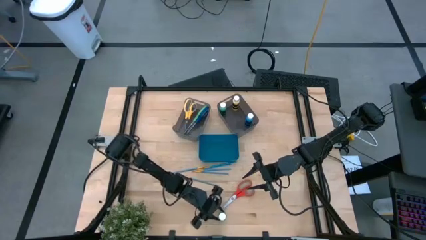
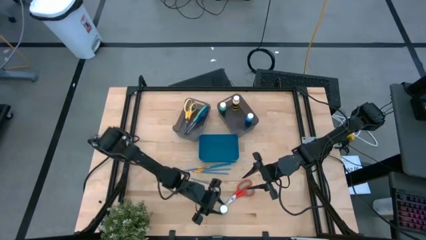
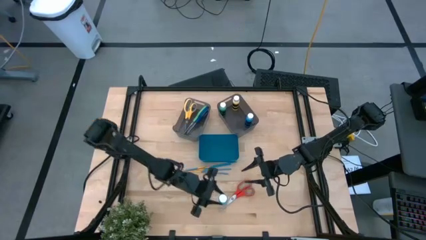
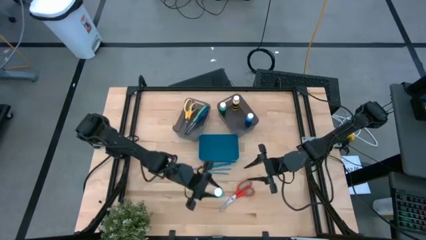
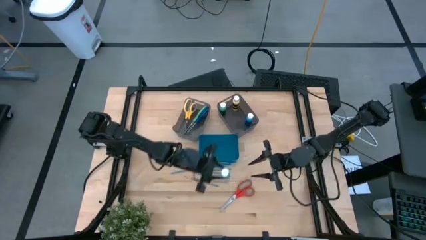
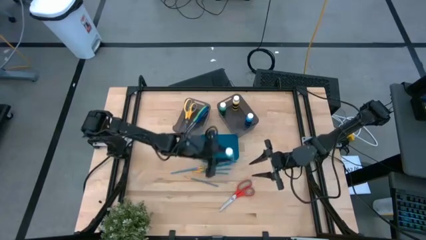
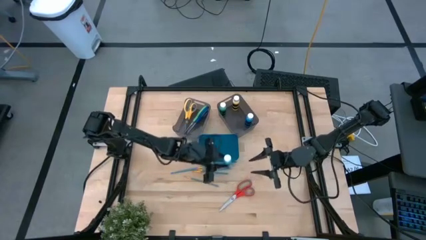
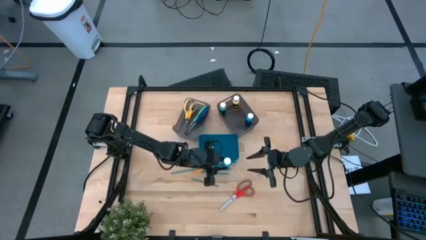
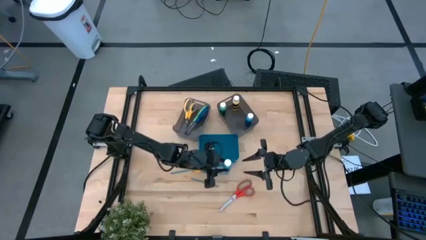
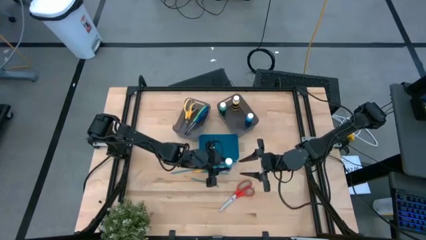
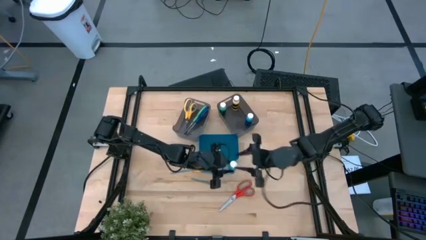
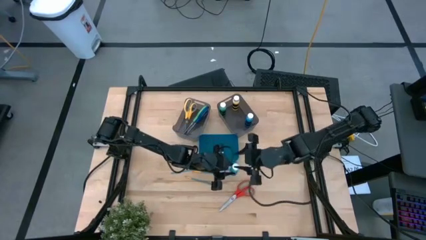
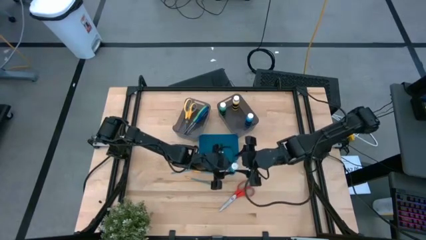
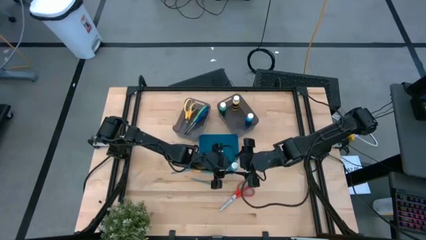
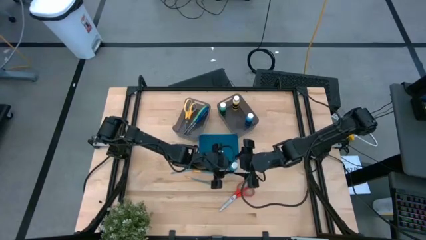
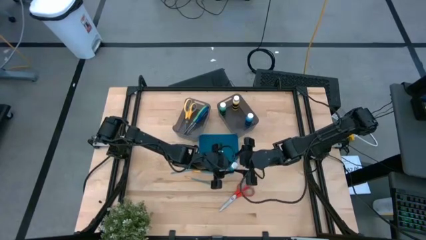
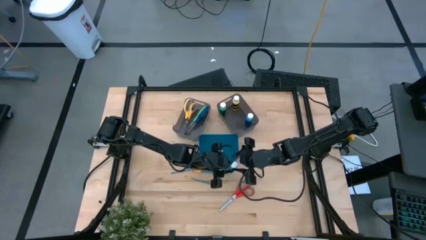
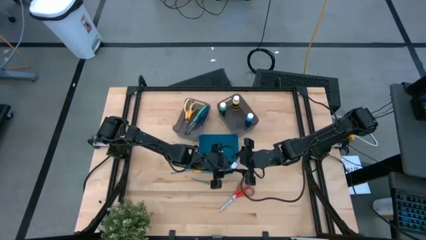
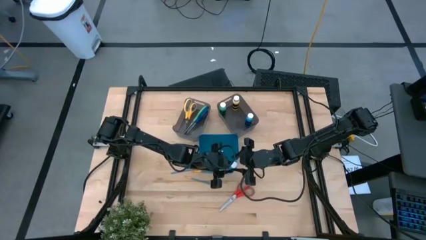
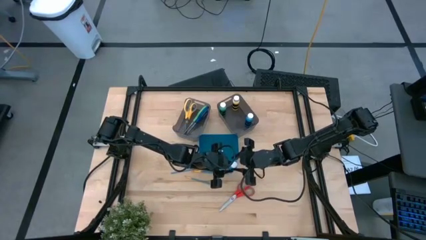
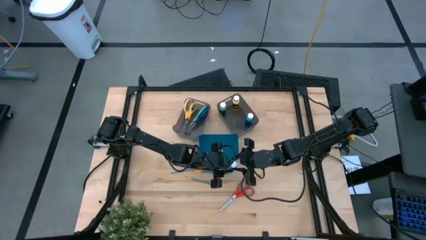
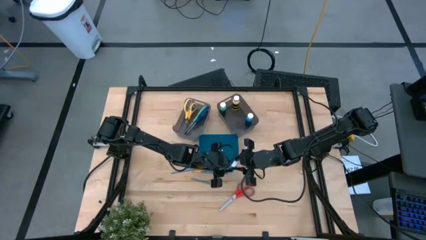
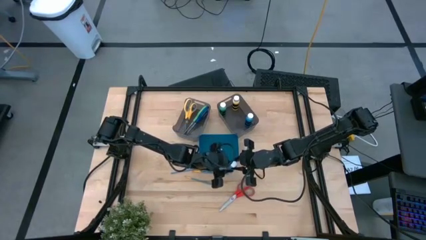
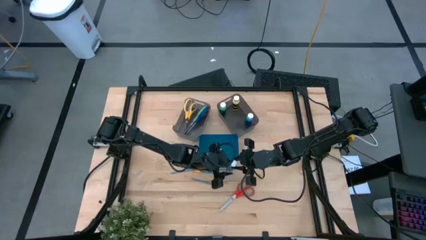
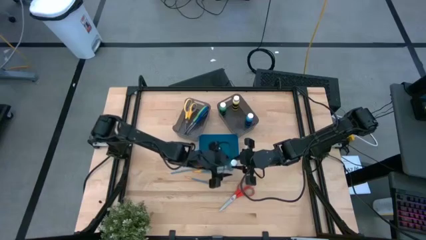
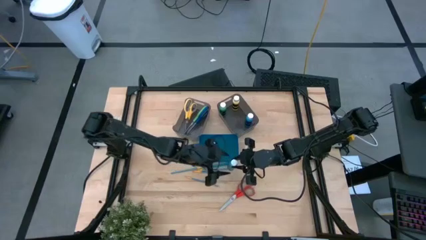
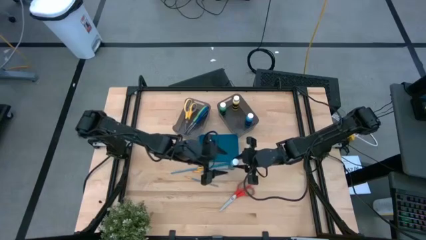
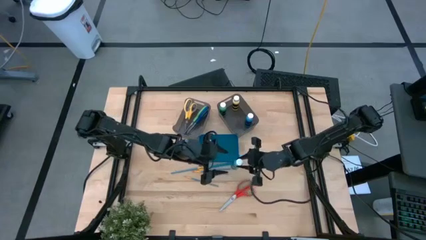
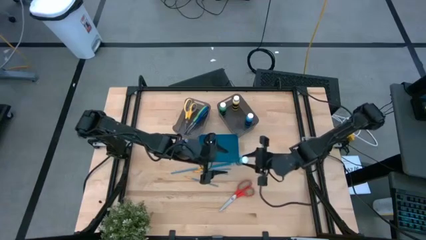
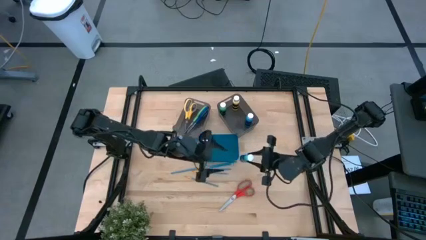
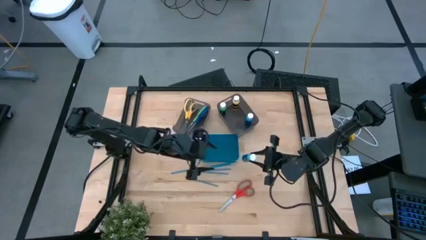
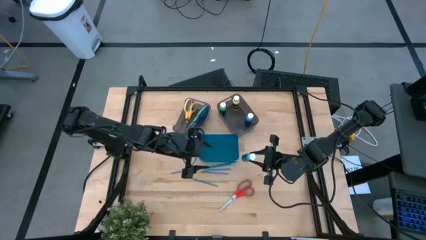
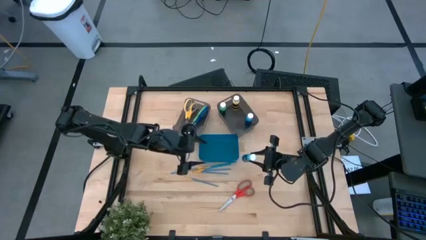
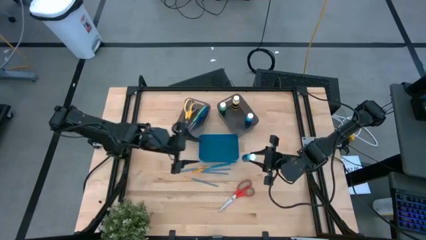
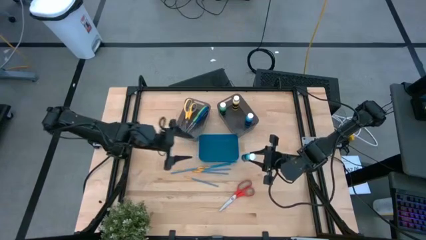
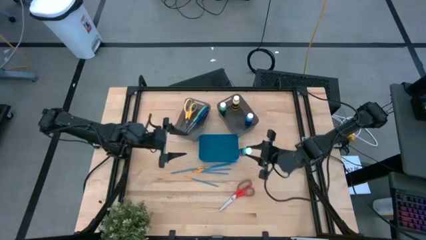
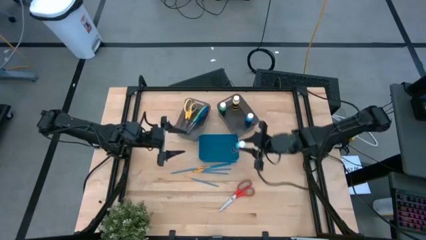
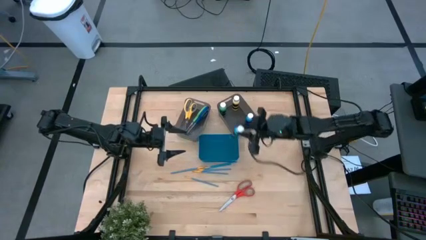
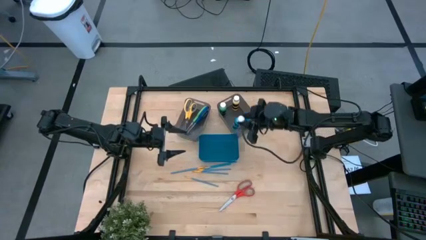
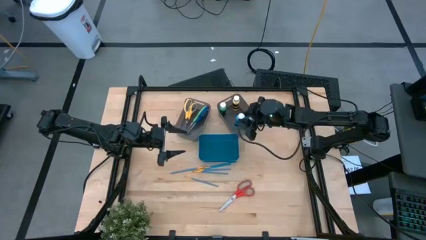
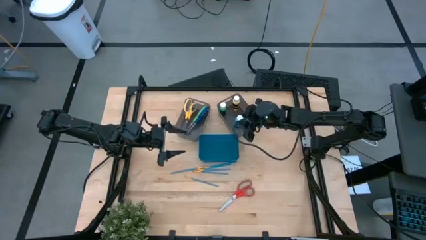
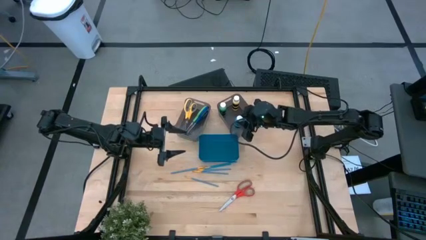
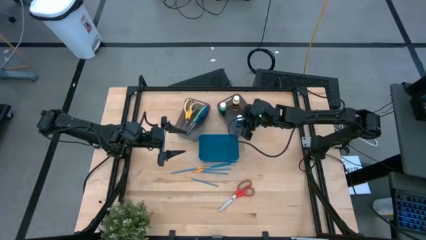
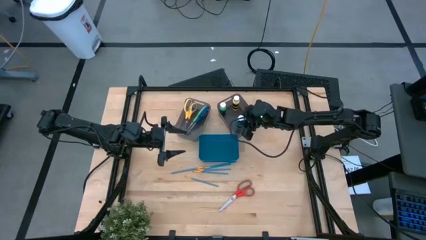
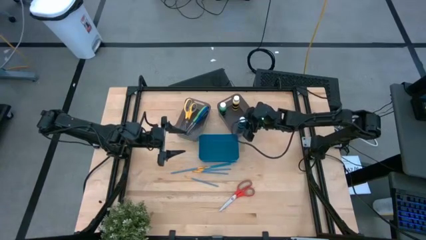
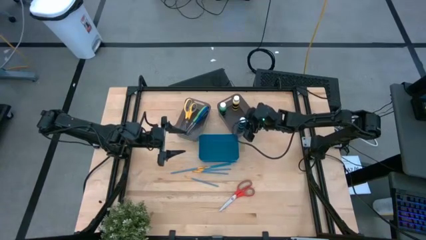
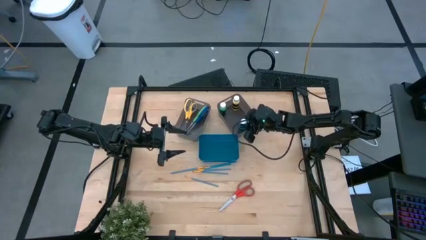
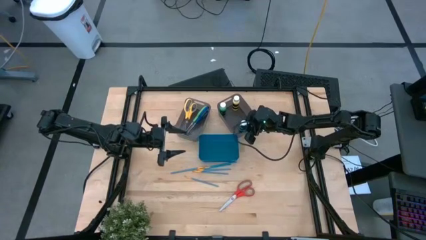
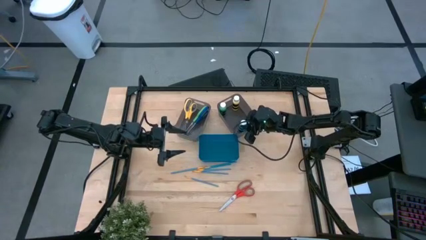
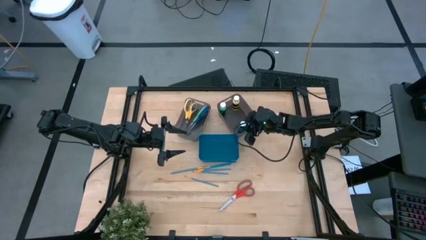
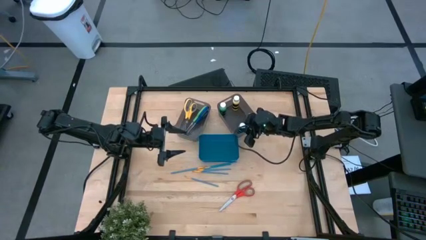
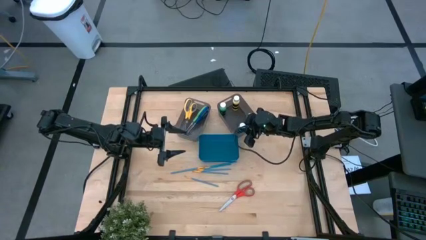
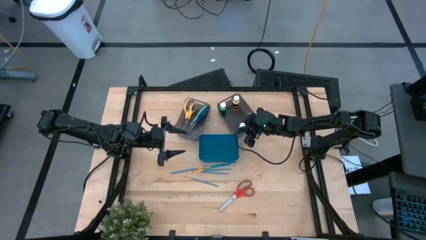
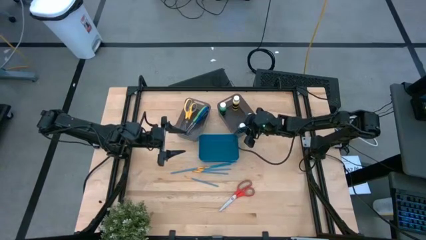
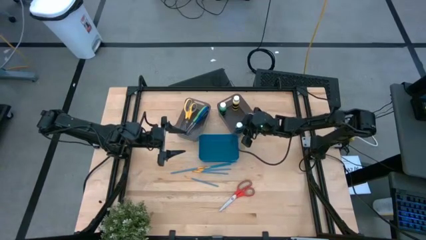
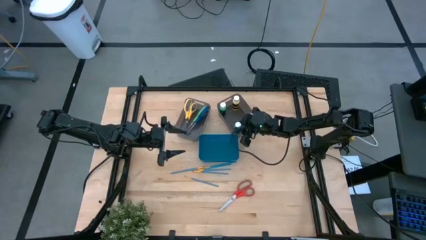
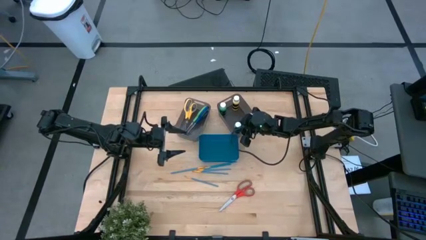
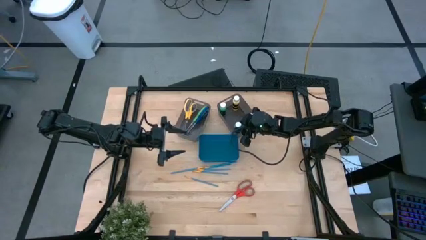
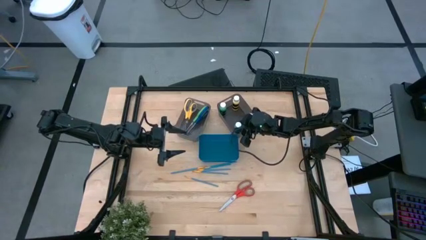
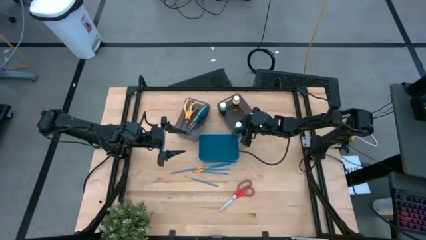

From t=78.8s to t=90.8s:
Task: Pick & Place Paint Supplies
Put the light blue paint bottle into the right black bin

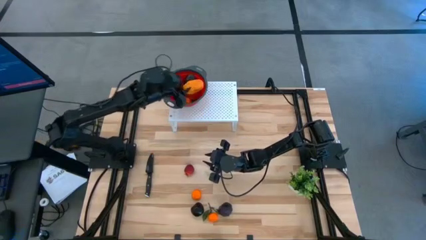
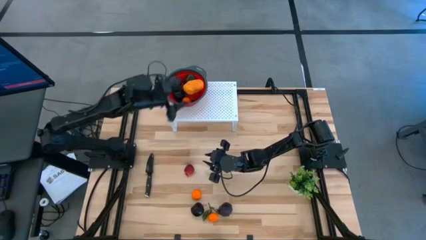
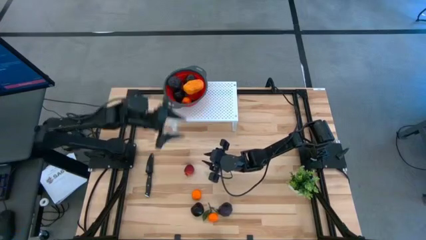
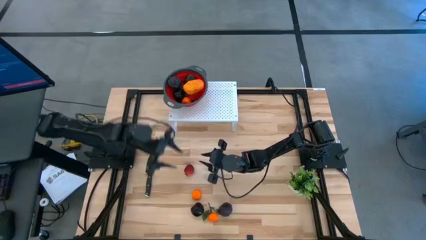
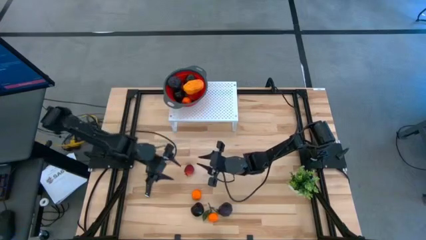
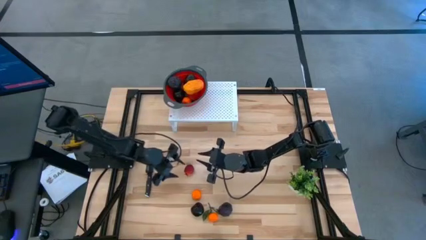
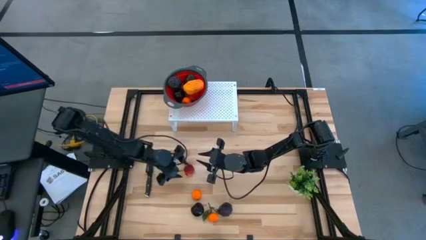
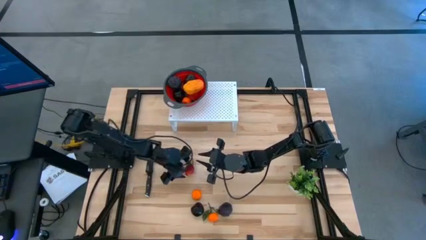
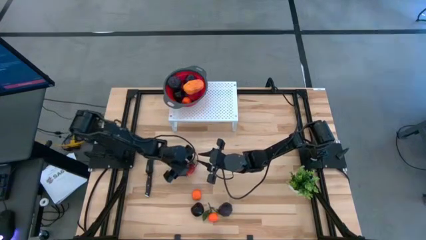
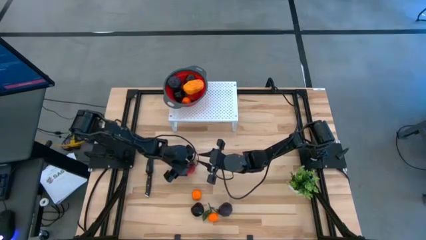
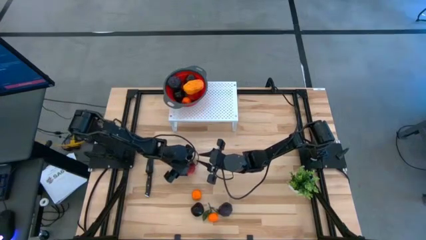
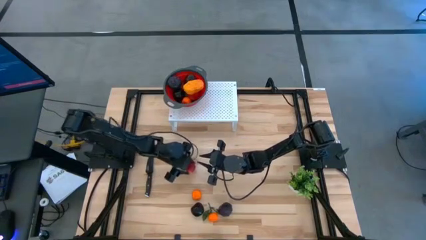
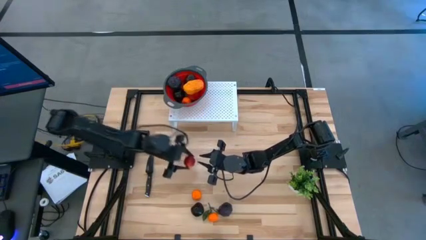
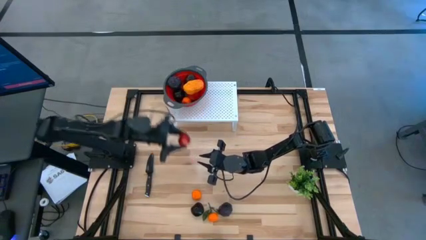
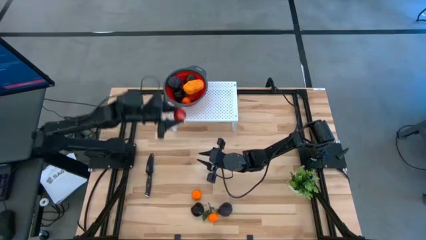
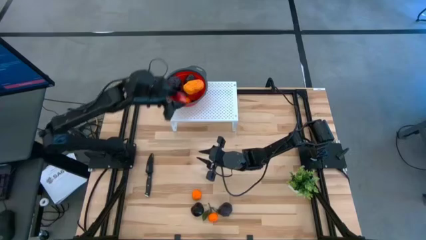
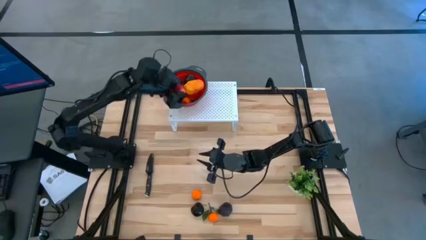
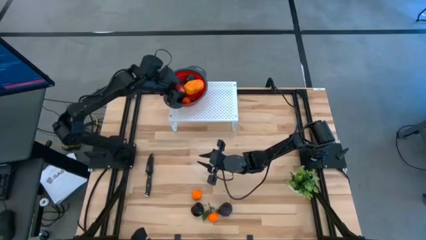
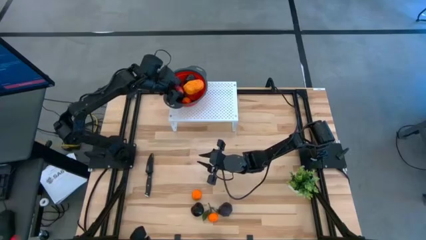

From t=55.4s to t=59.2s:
Task: Pick & Place Fruit
Put the red pomegranate into the red strainer bowl on the shelf
